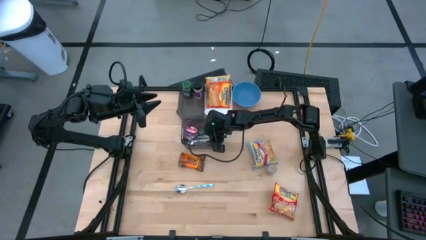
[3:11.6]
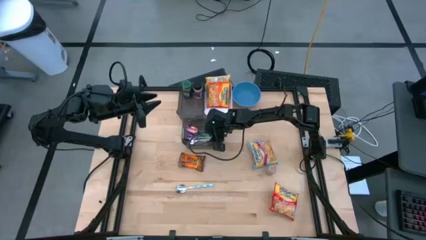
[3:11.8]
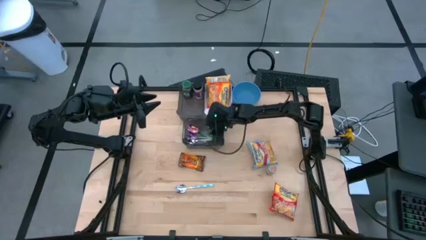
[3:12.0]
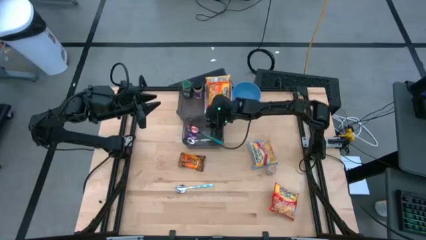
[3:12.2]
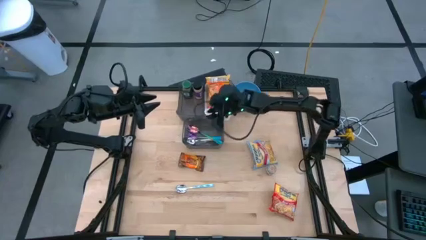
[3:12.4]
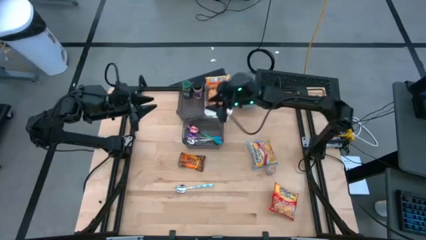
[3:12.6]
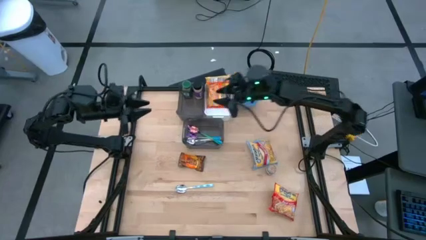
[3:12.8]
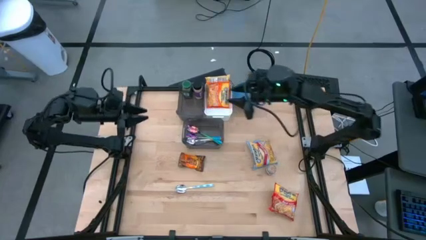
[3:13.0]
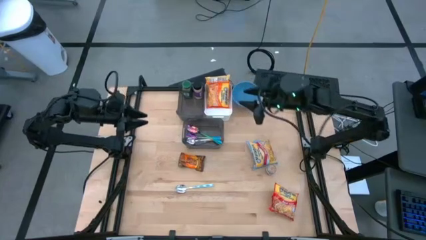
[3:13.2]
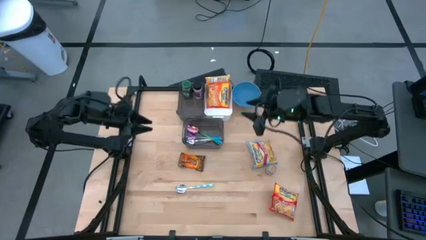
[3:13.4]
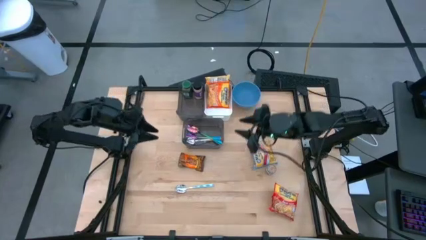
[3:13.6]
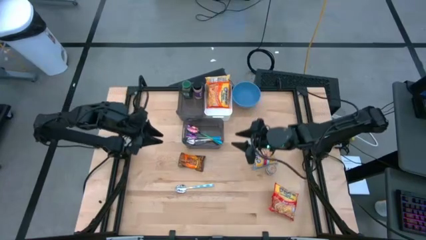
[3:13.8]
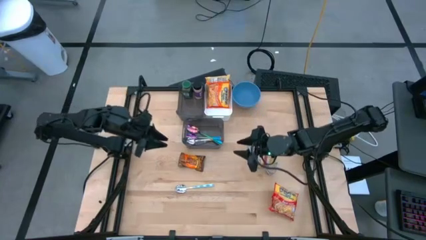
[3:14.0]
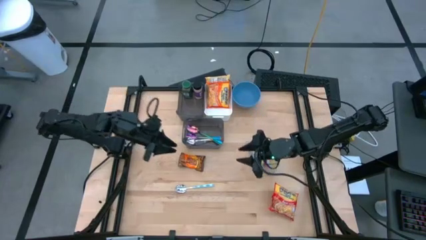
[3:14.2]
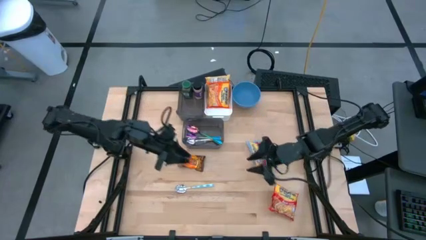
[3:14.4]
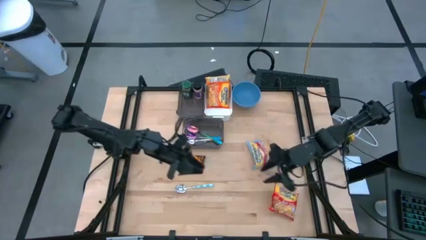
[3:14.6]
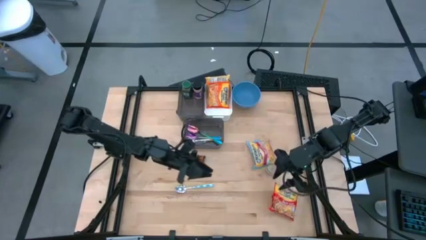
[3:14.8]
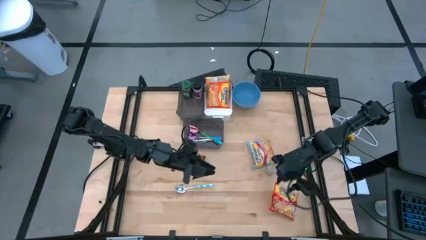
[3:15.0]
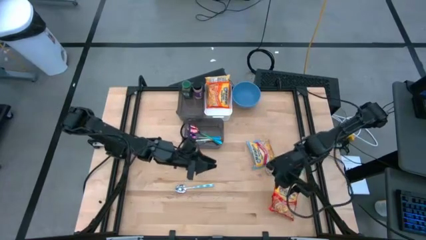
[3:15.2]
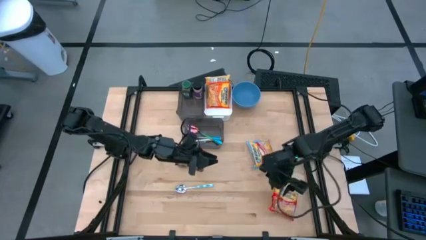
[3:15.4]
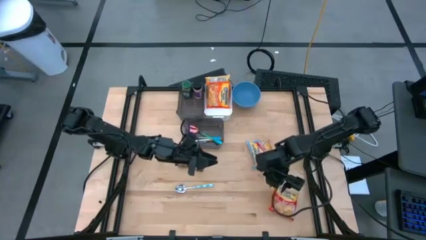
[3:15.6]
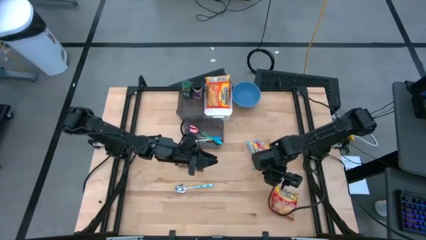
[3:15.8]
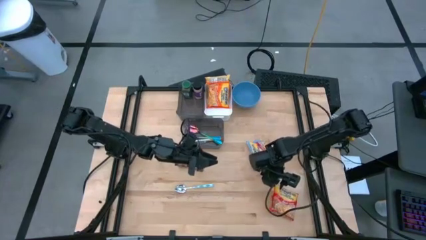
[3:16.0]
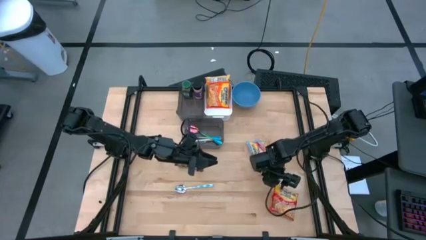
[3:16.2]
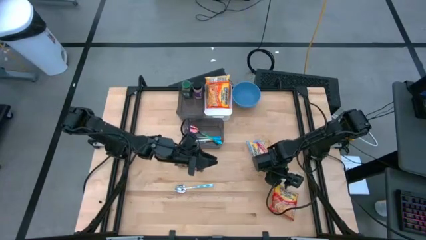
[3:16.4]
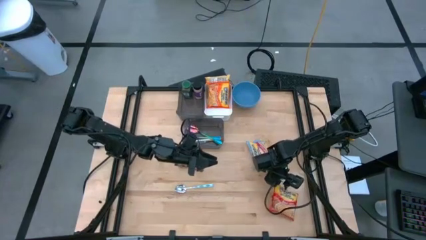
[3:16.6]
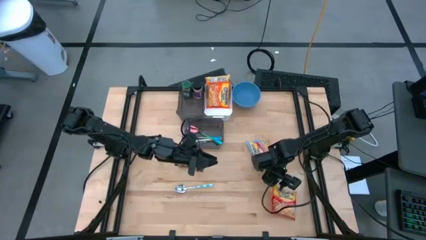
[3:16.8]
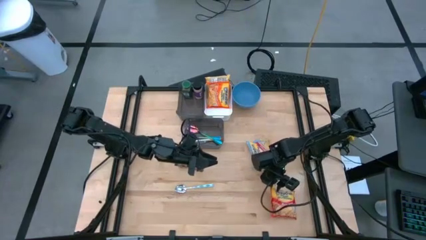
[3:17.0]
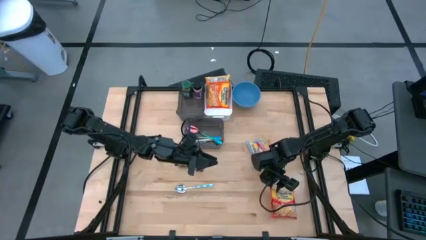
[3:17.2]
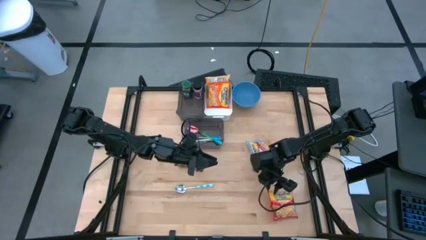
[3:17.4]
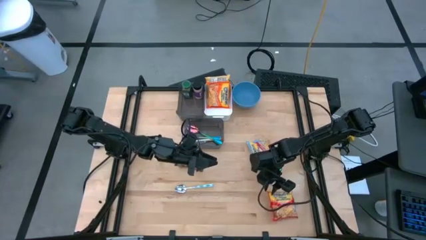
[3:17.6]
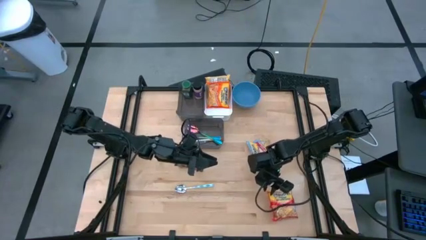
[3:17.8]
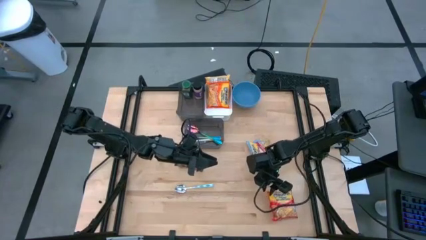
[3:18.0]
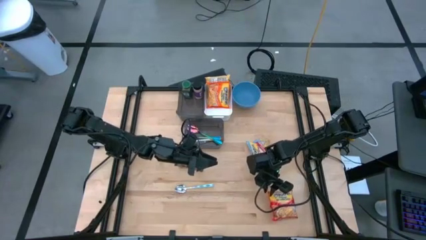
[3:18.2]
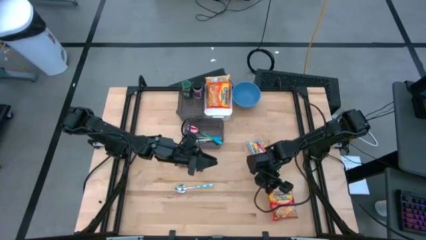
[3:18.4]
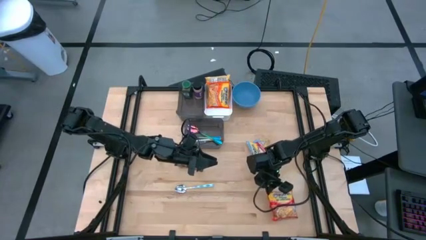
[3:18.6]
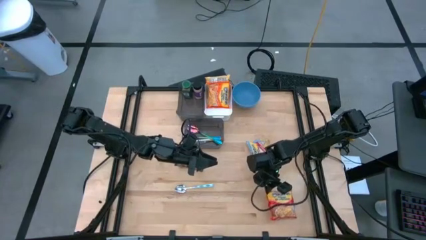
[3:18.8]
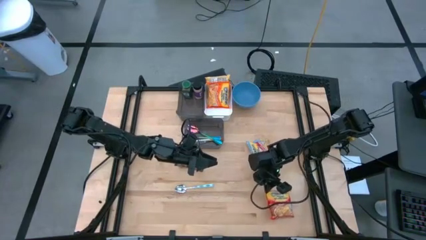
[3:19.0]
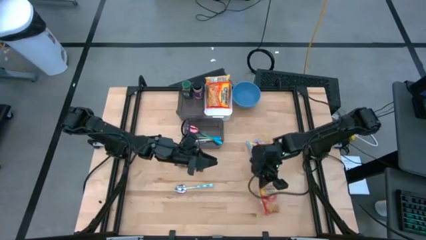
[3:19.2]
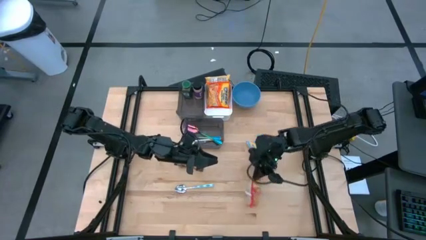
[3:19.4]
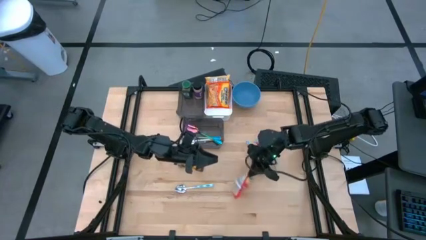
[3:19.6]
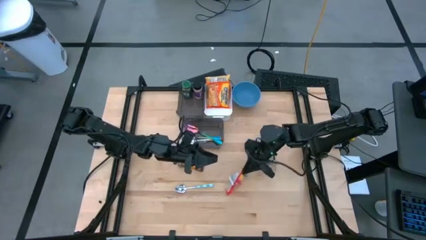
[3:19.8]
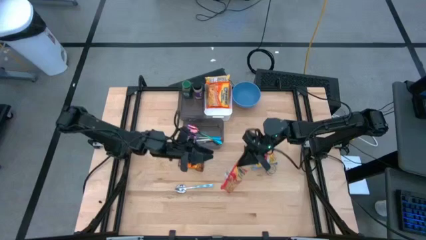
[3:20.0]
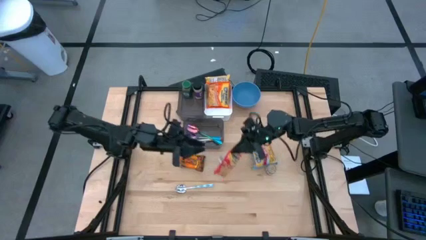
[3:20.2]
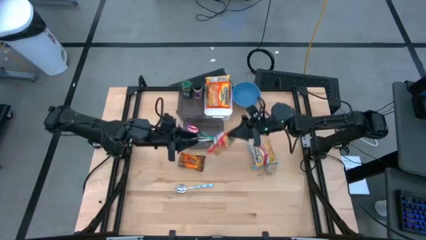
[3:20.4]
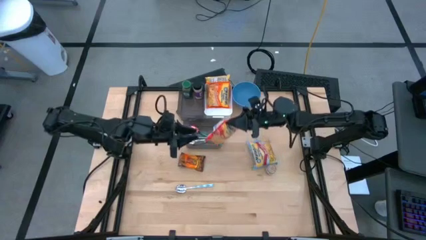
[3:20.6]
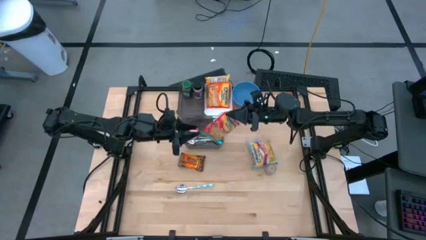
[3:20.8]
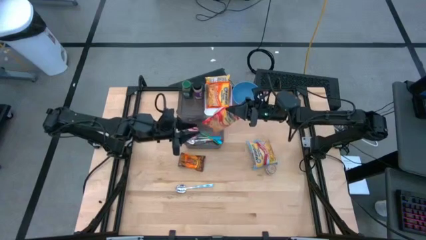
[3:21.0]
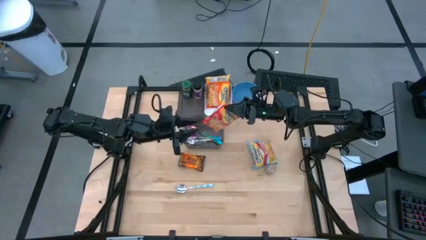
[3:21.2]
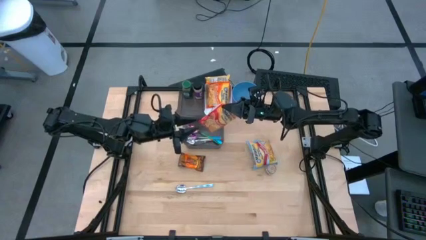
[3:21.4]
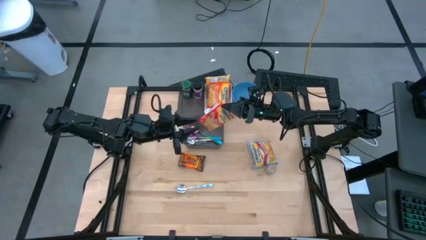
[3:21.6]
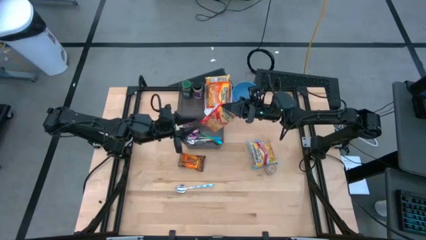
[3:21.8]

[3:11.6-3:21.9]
Task: Pick & Place Food Item
Put the red noodle pack into the white bin

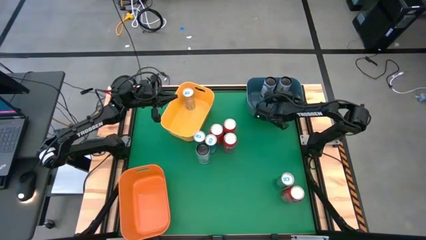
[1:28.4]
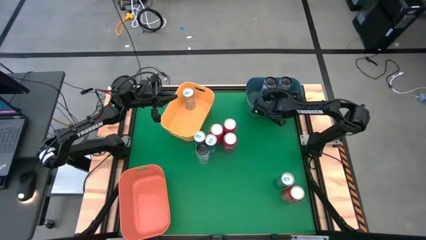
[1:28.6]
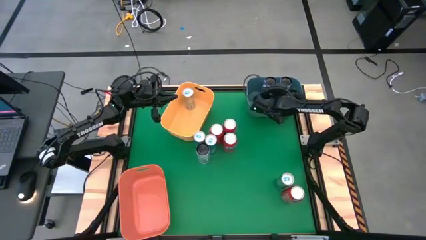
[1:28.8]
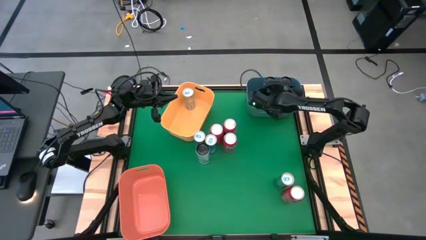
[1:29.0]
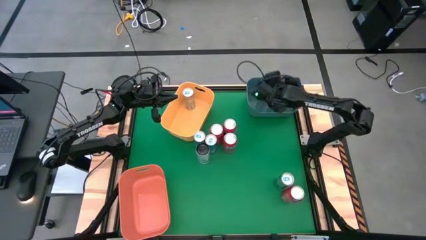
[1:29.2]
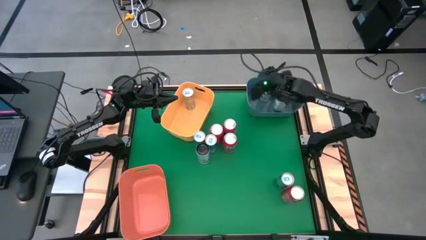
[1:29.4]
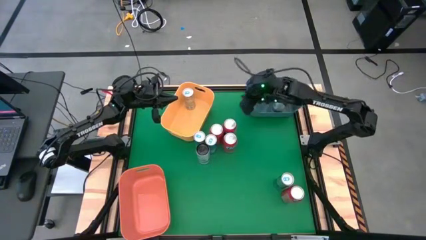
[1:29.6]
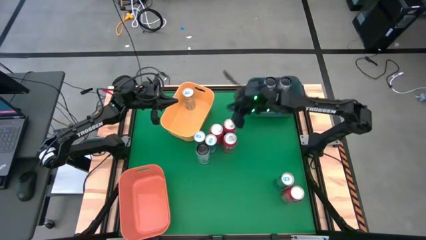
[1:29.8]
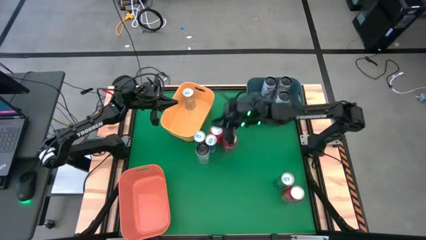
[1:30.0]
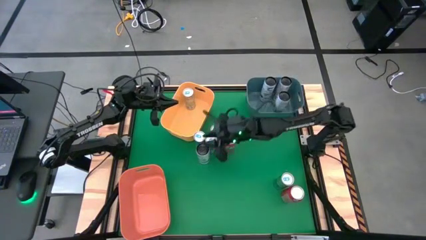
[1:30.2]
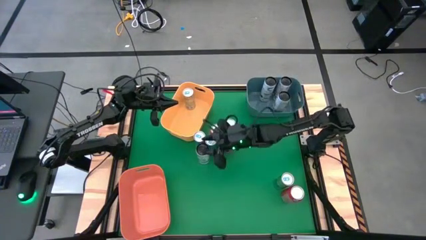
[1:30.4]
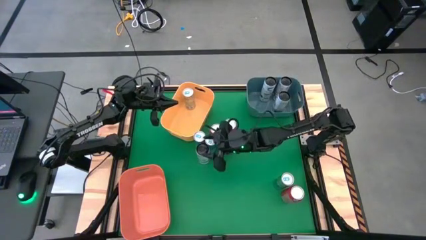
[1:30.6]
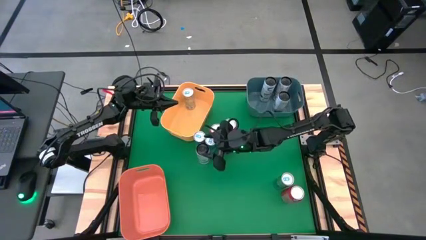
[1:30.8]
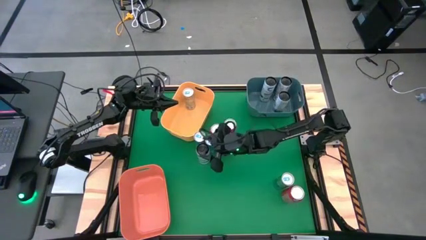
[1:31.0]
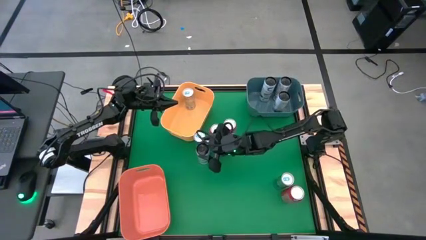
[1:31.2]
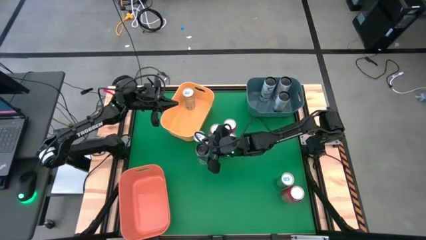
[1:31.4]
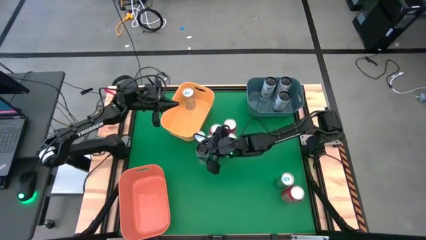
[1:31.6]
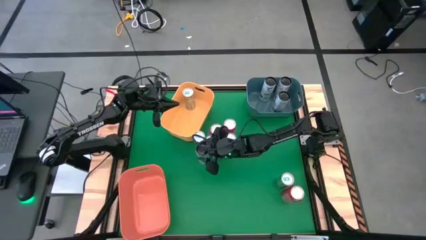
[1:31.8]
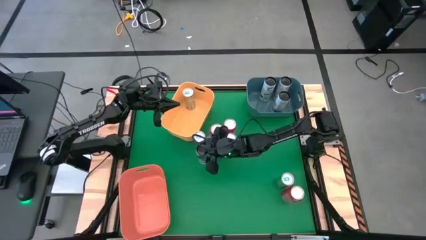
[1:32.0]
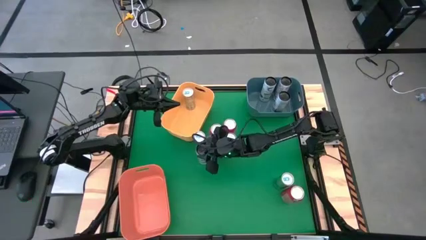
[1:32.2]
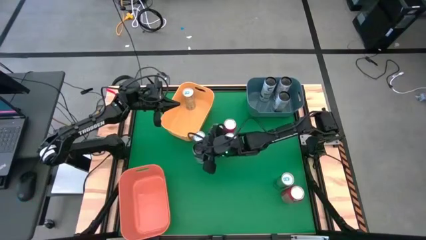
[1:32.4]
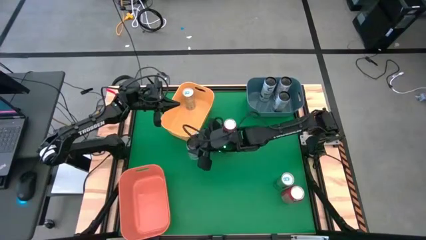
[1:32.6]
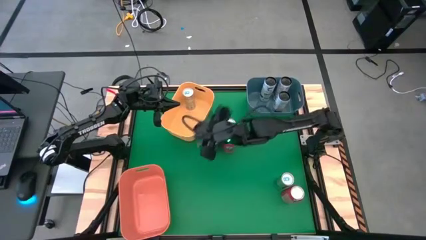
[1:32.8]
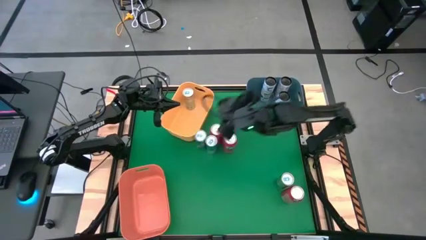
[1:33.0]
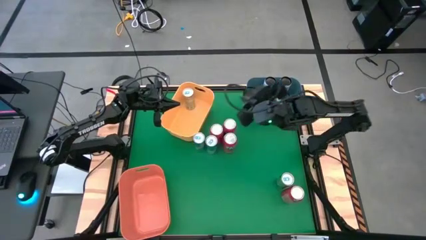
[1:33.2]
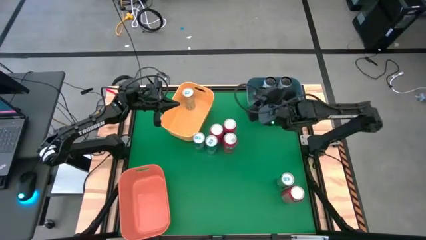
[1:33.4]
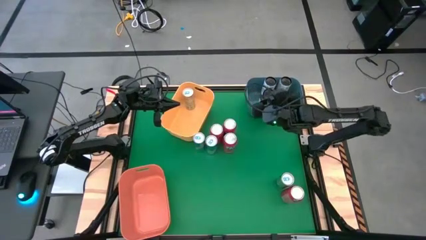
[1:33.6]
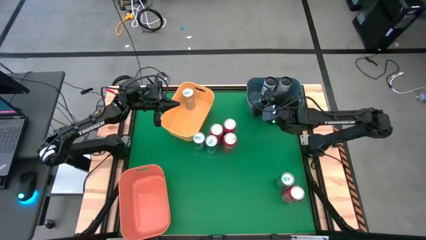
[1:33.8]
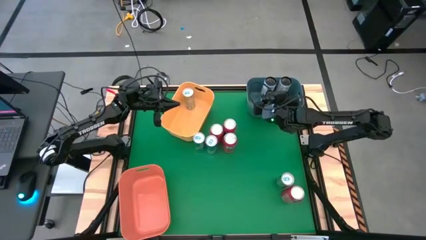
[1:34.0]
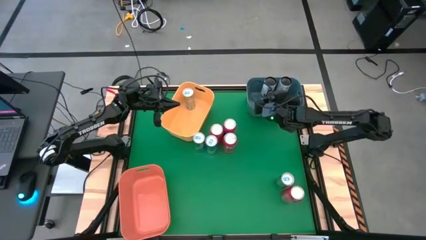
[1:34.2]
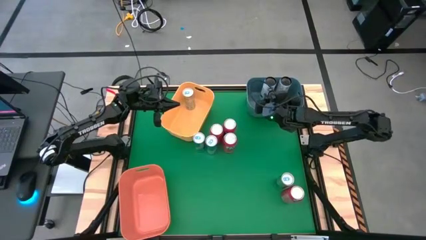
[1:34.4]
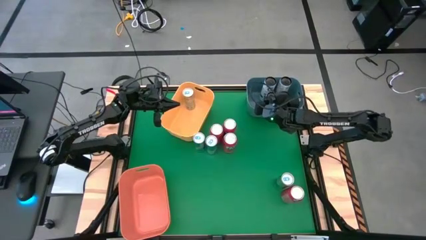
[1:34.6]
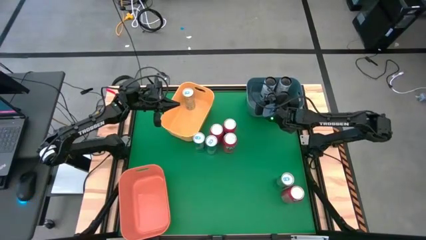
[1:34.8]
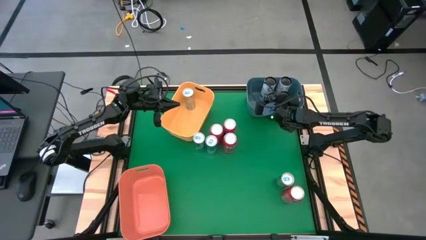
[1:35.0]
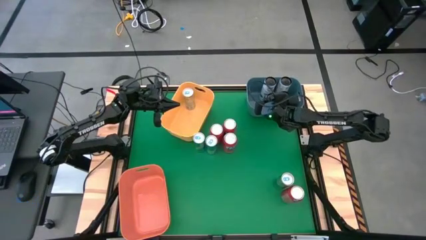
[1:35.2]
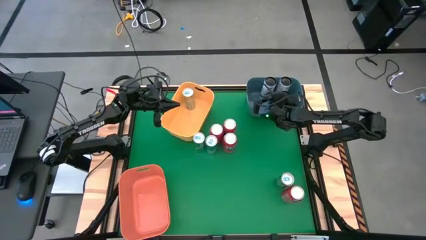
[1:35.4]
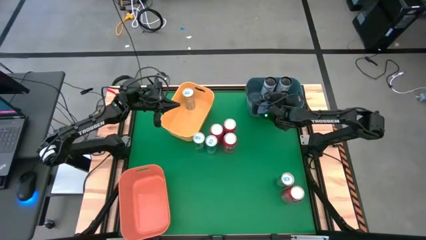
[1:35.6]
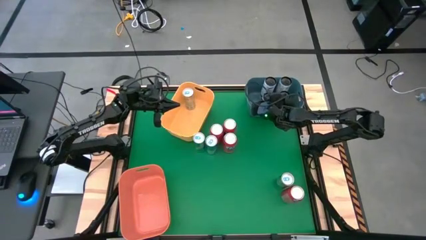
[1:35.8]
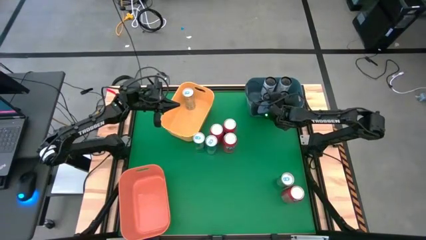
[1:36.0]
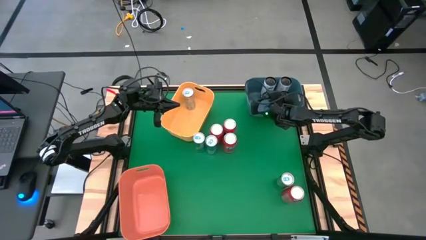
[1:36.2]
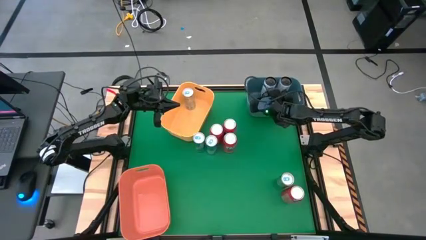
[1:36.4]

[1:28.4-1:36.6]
Task: Sort soda cans
Put the white blue soda can into the blue bin
